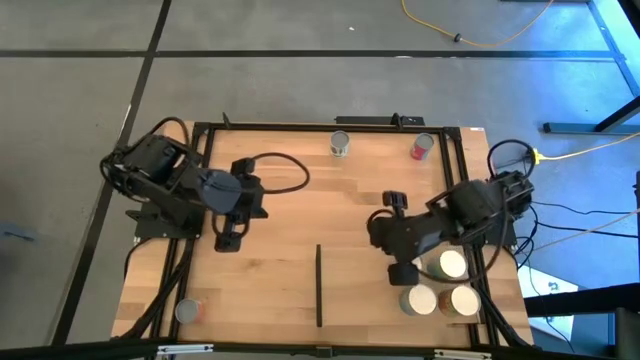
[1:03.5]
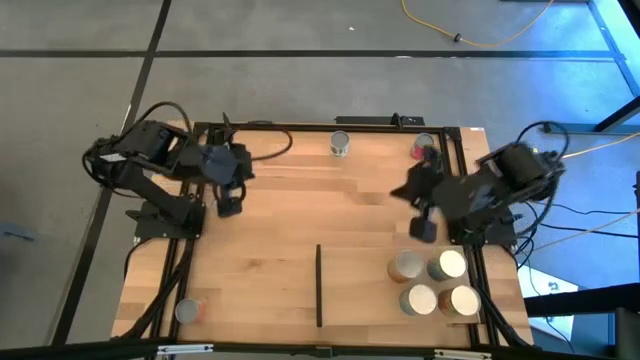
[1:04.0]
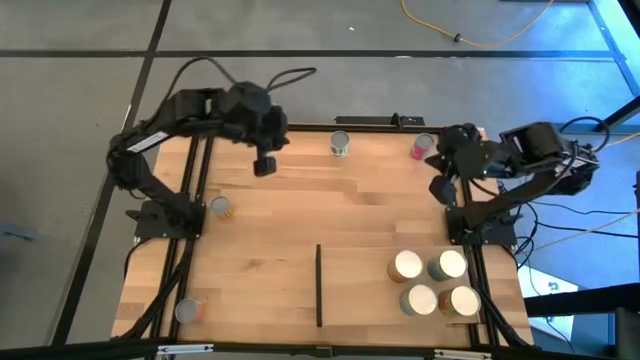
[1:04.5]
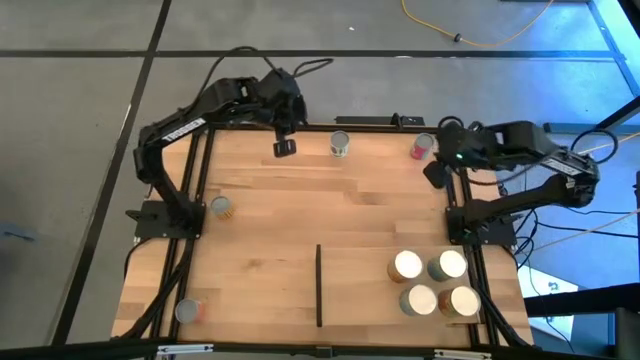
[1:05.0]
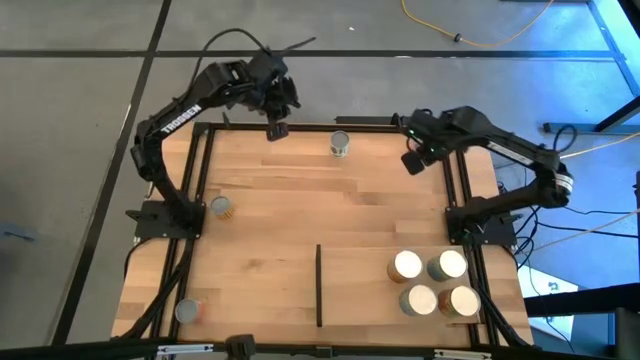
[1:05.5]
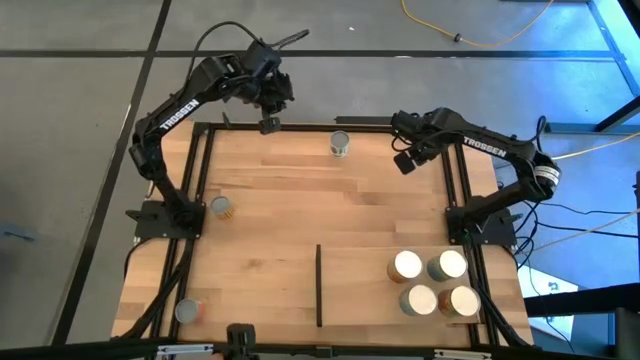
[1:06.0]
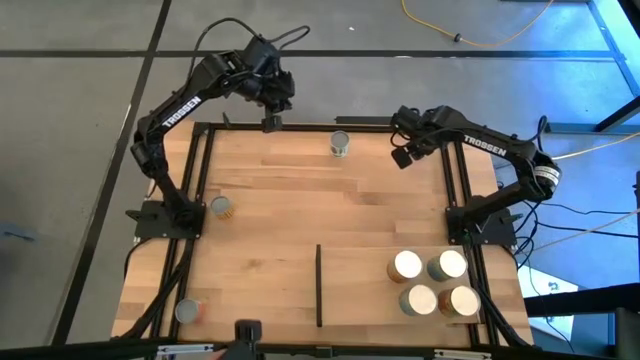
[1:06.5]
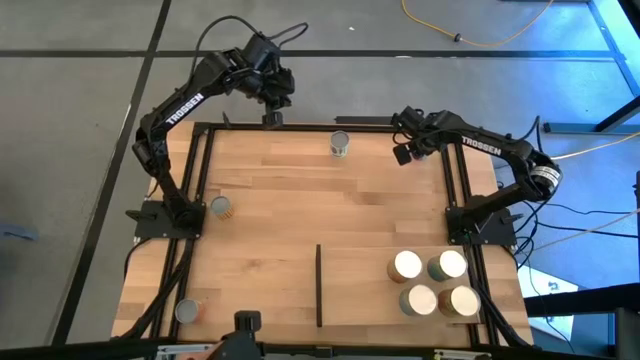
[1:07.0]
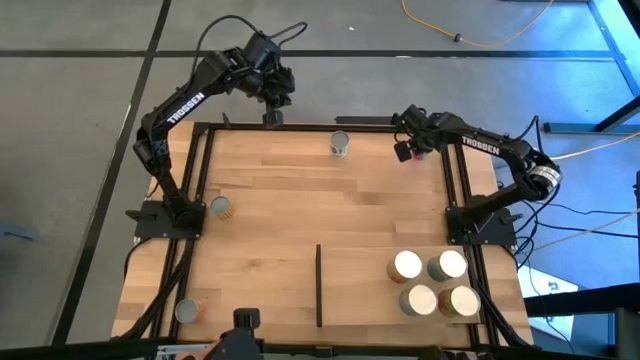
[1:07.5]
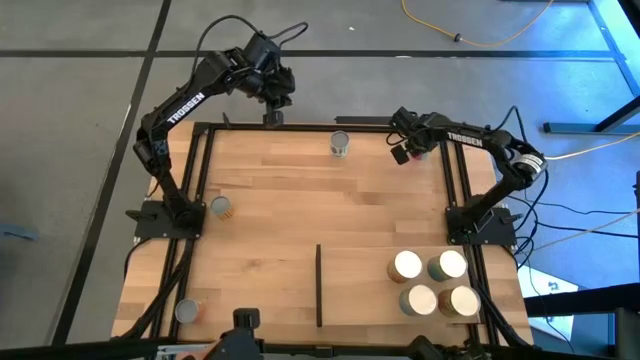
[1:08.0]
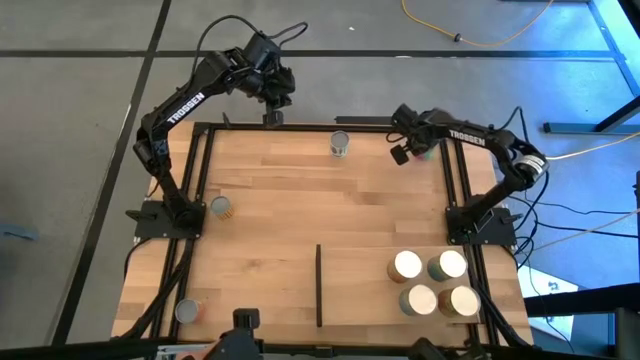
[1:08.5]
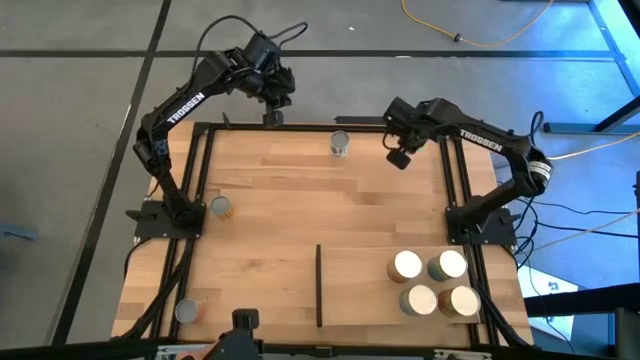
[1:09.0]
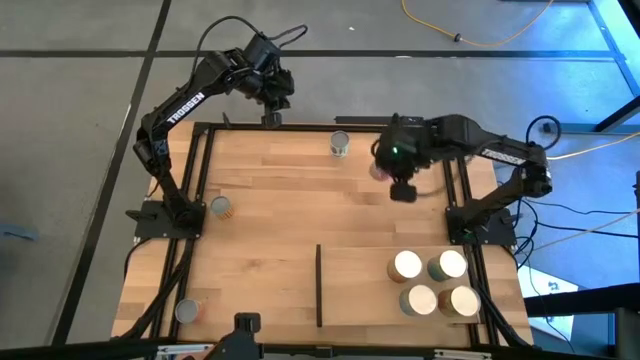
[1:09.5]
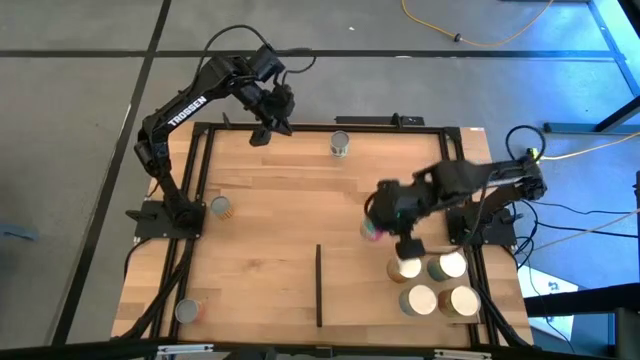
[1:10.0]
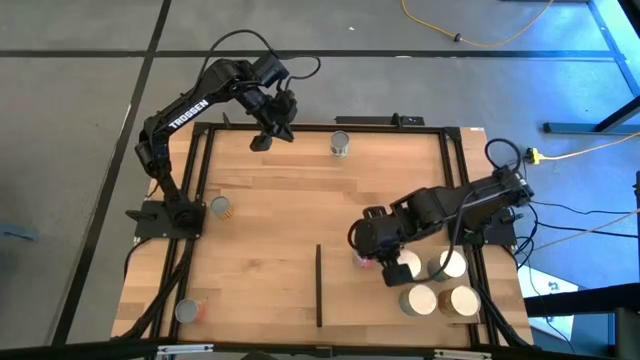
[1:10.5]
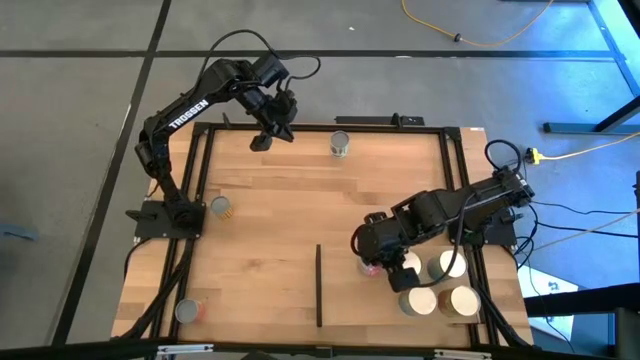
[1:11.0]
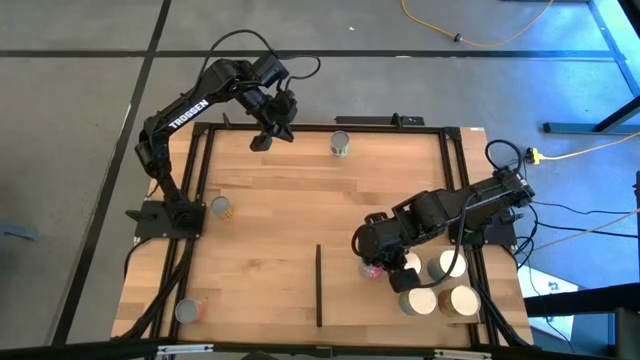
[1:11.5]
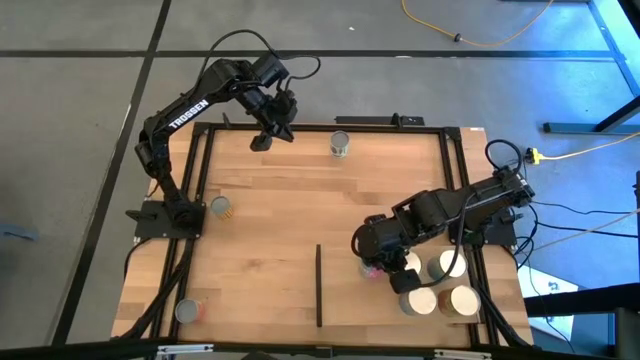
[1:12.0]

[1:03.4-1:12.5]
Task: Pick and place cans onto a shelf
Put the canned chicken soup on the shelf

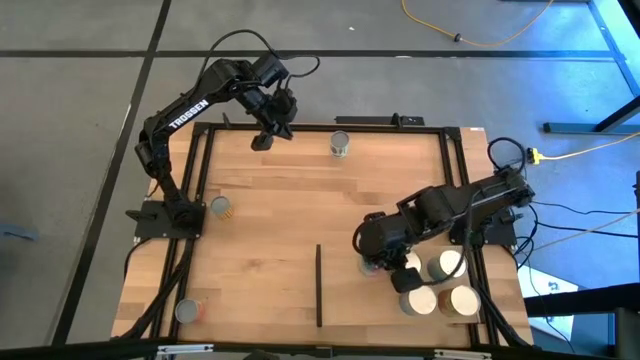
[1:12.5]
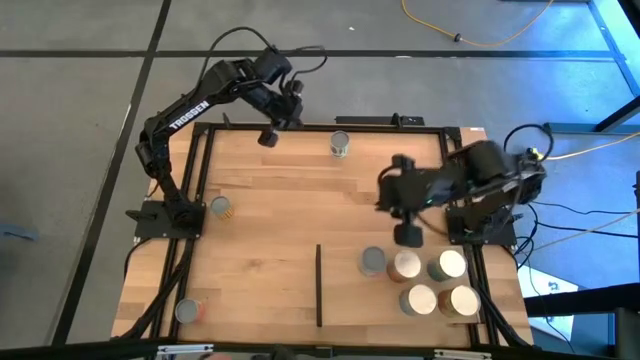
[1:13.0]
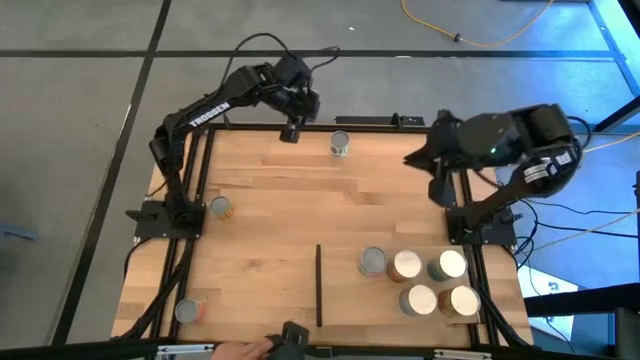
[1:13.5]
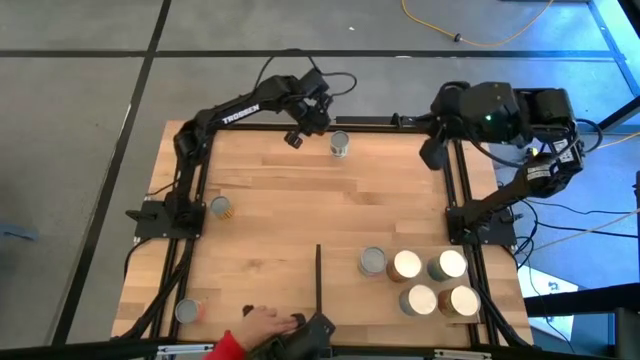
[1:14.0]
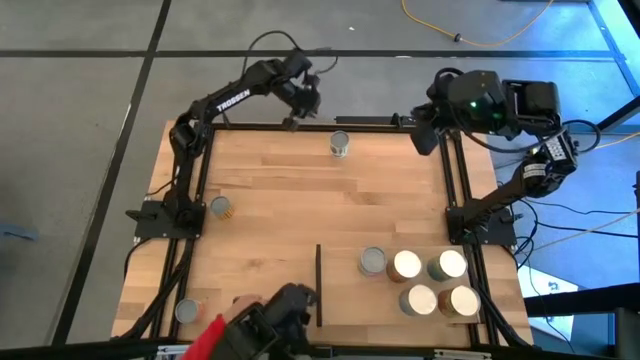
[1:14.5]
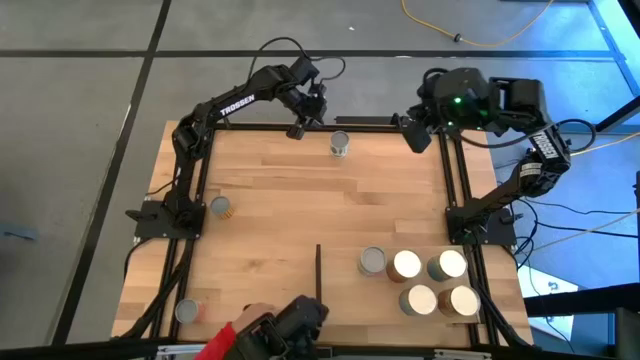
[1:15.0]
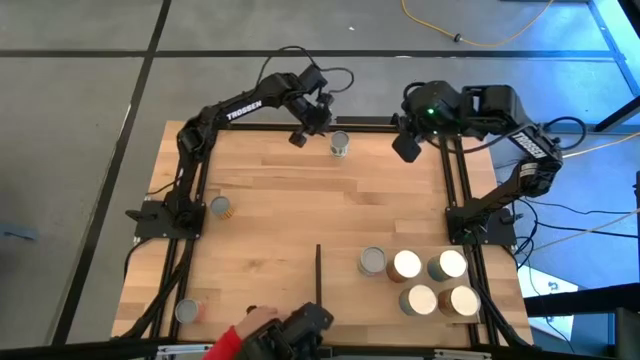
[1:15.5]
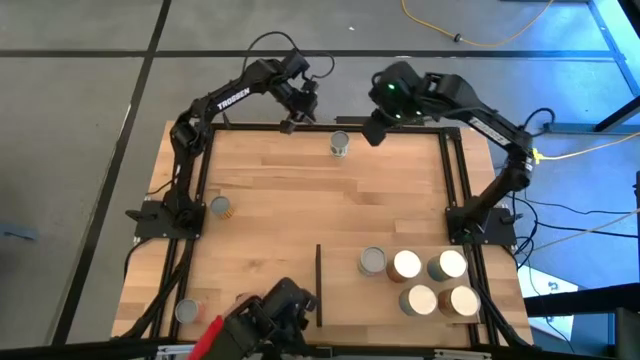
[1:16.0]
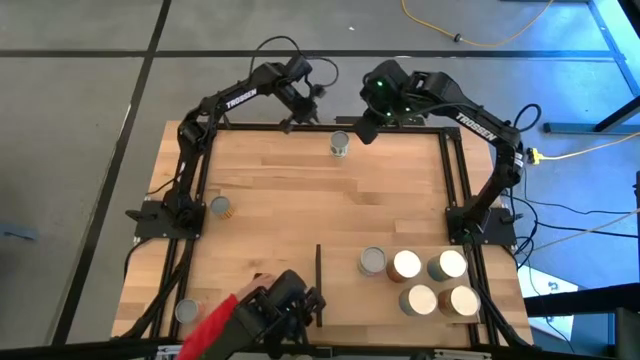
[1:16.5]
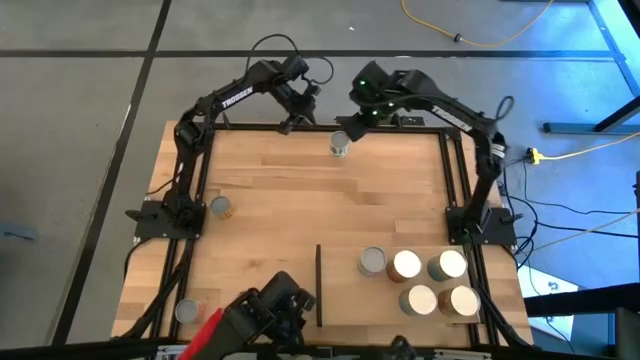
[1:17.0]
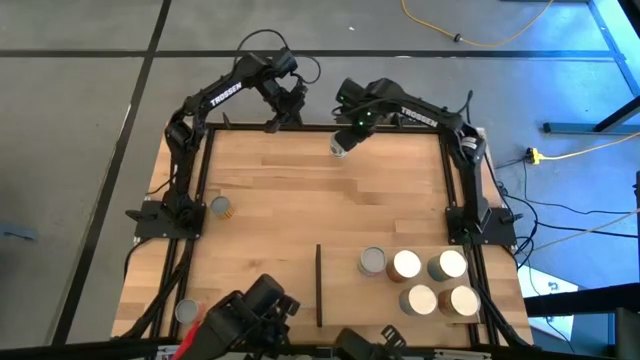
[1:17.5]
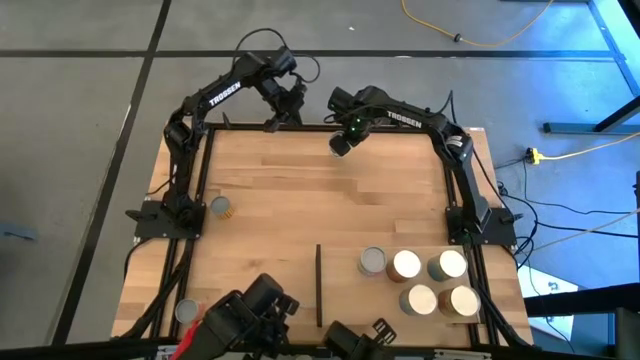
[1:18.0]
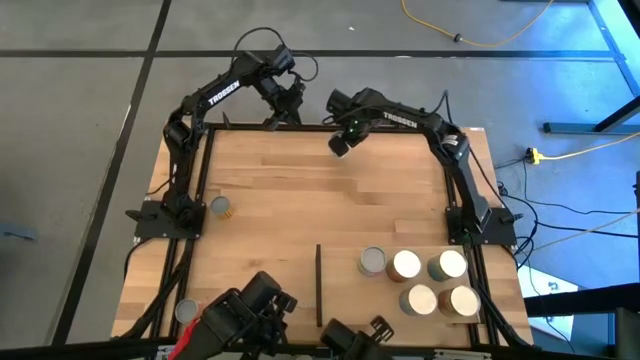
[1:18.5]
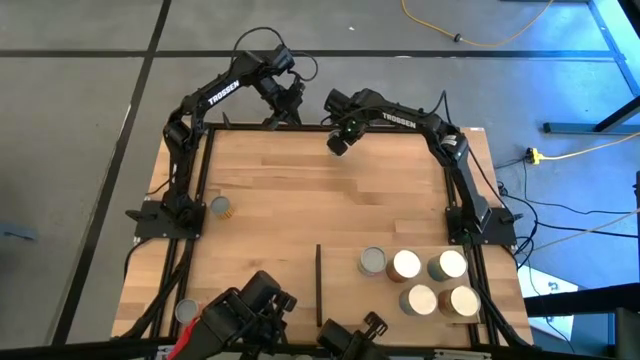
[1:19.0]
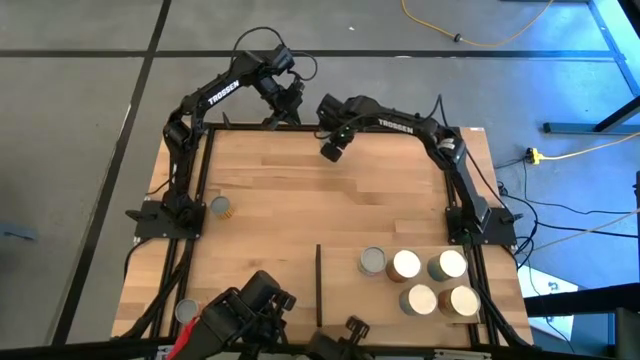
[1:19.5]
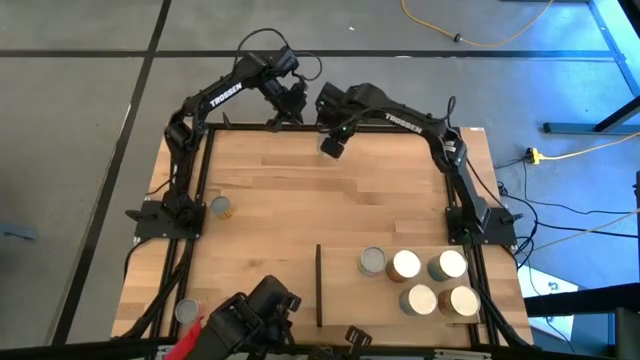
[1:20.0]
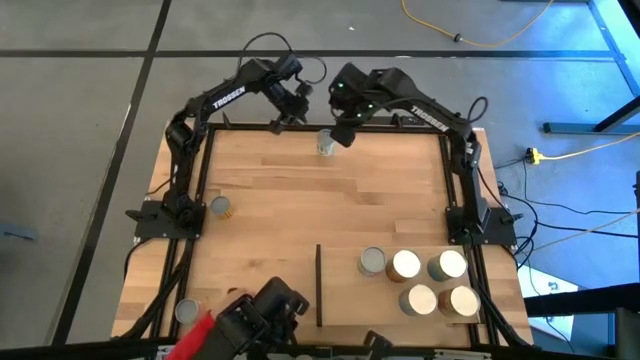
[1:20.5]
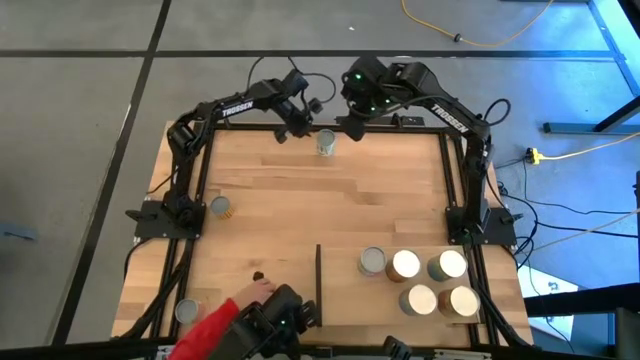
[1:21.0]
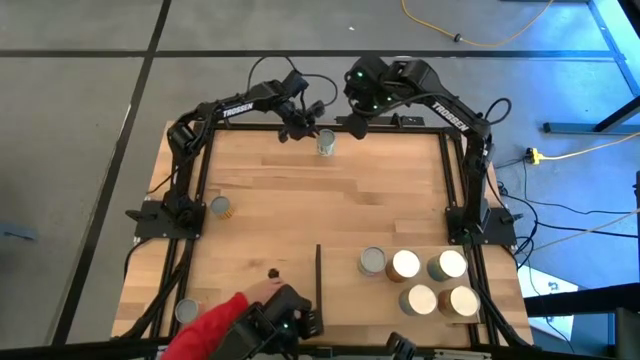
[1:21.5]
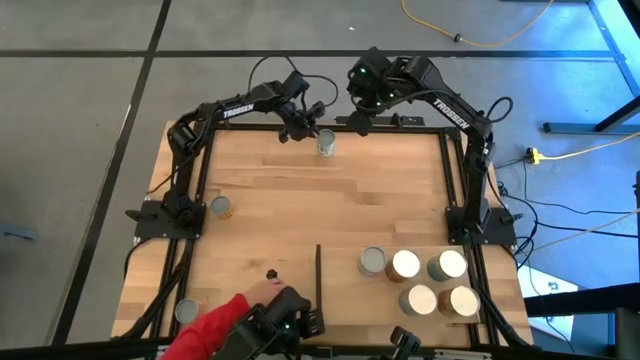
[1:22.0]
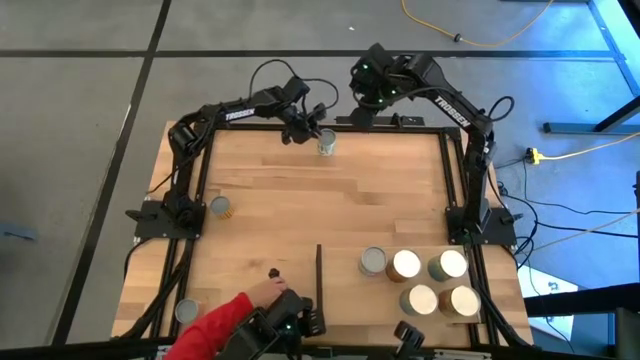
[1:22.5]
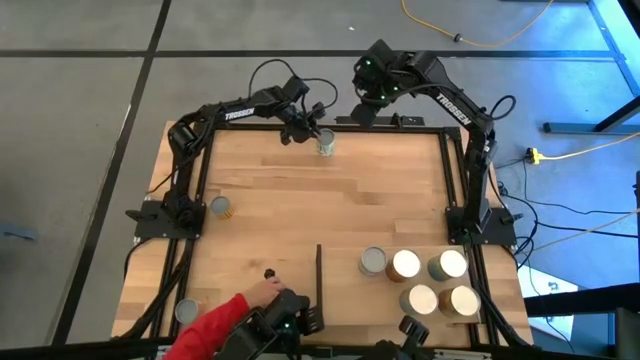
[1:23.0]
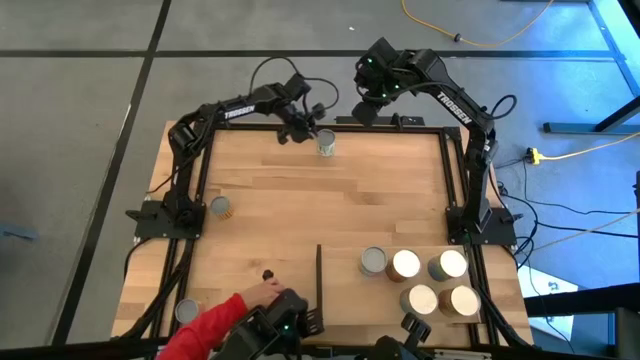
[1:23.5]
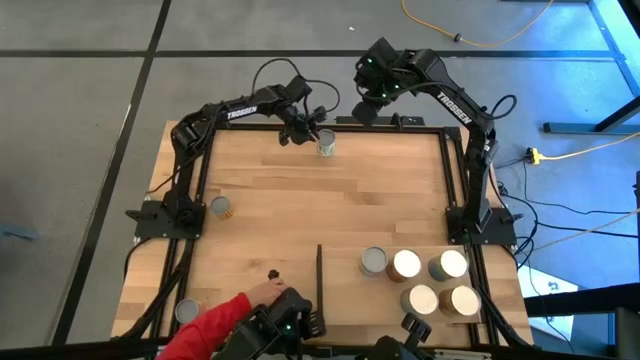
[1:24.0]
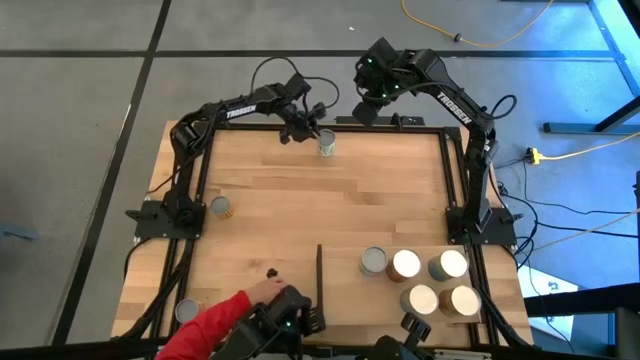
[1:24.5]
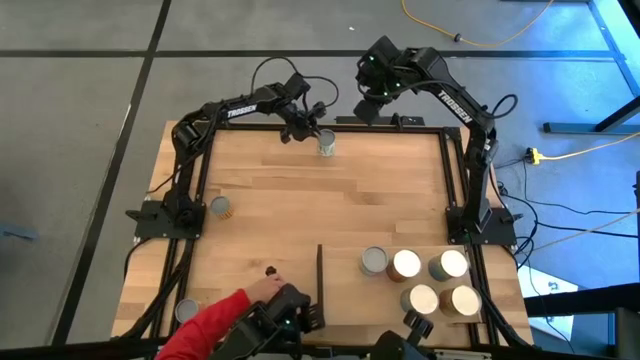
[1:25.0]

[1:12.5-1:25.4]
Put the canned mixed vegetables on the shelf

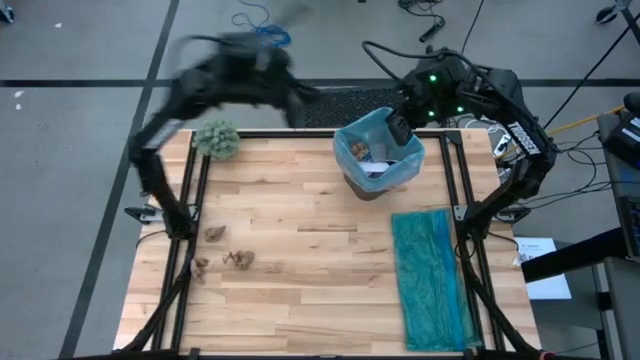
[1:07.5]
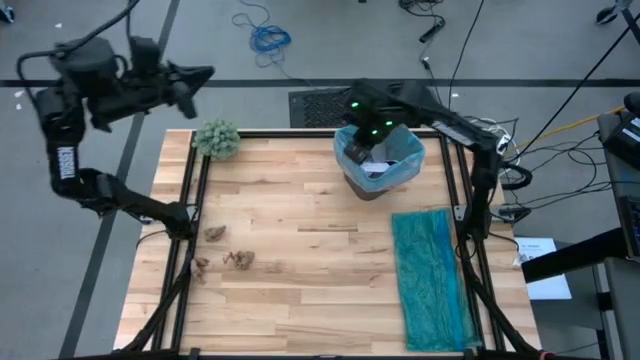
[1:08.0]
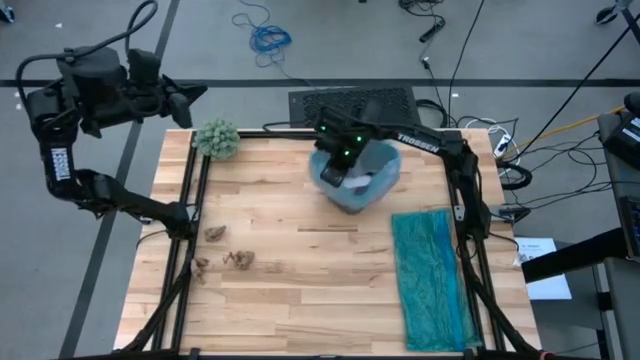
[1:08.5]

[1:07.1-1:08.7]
Task: place trash/remove bag and relplace
Adjust the black trash bin
